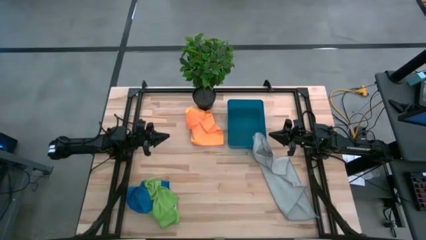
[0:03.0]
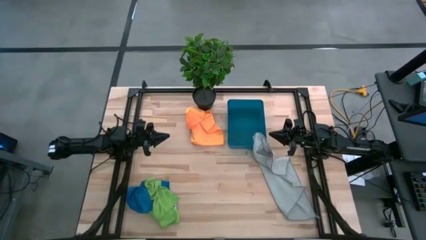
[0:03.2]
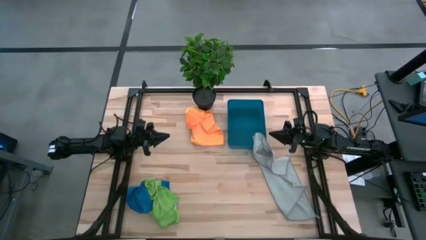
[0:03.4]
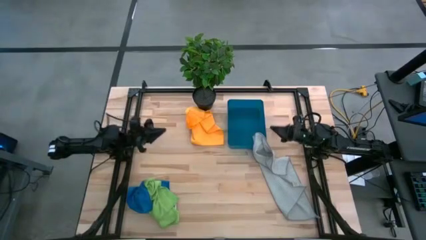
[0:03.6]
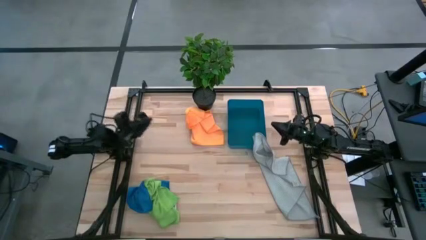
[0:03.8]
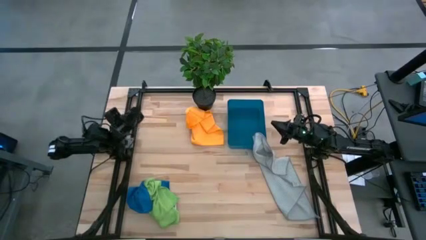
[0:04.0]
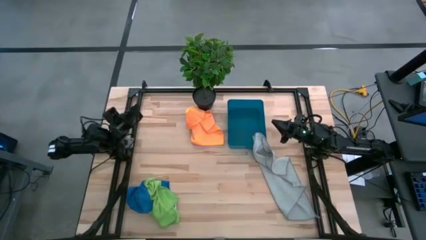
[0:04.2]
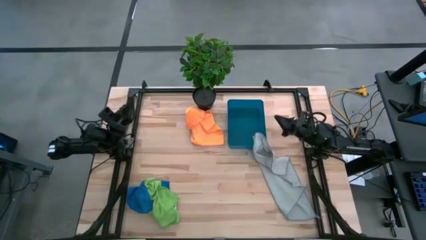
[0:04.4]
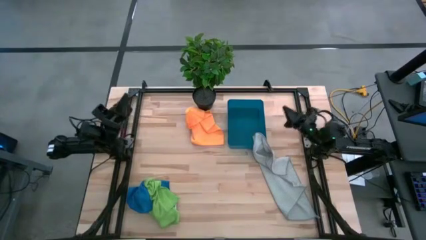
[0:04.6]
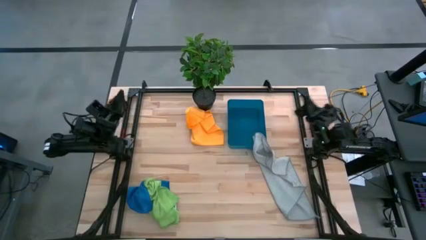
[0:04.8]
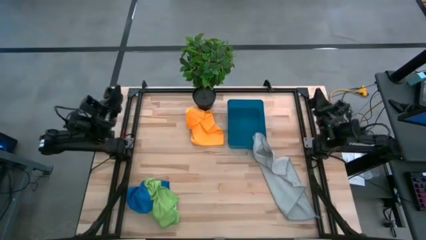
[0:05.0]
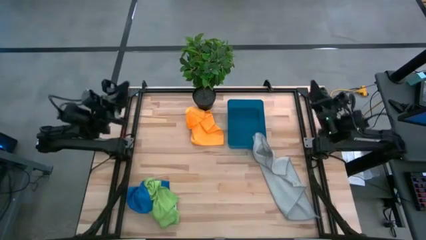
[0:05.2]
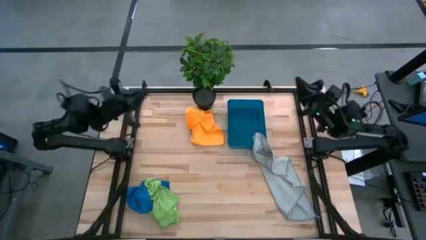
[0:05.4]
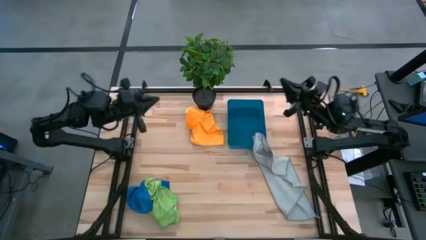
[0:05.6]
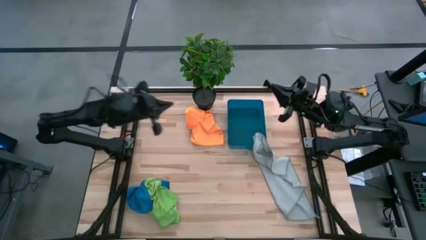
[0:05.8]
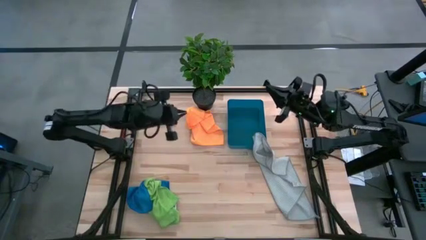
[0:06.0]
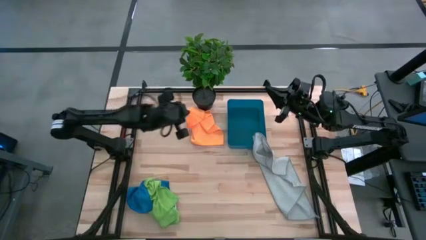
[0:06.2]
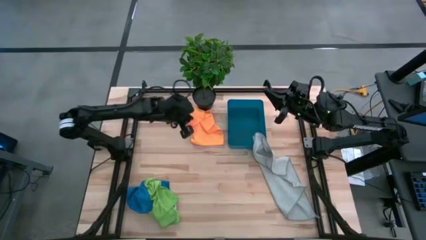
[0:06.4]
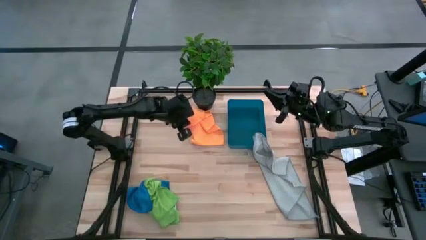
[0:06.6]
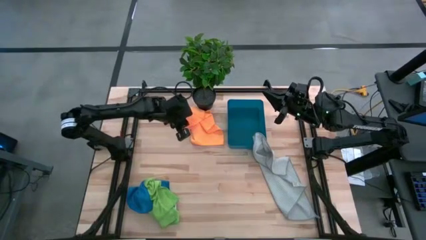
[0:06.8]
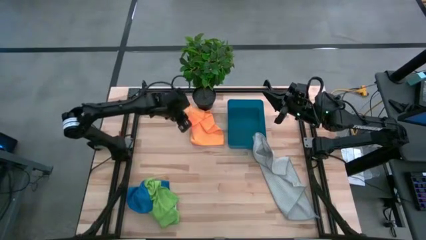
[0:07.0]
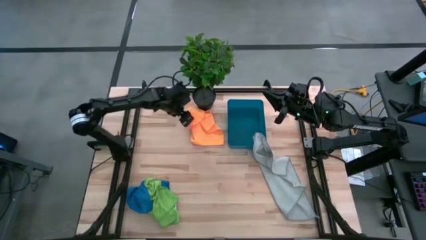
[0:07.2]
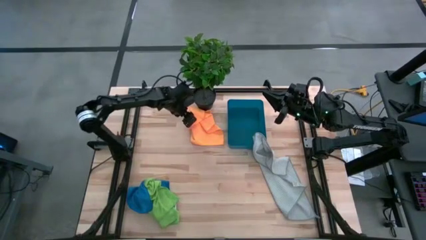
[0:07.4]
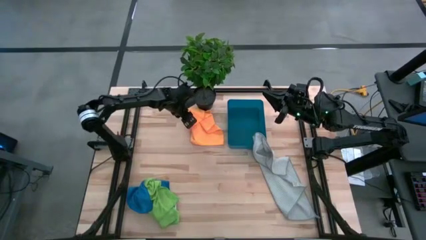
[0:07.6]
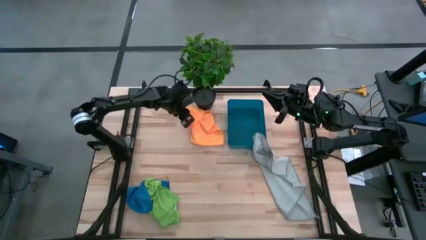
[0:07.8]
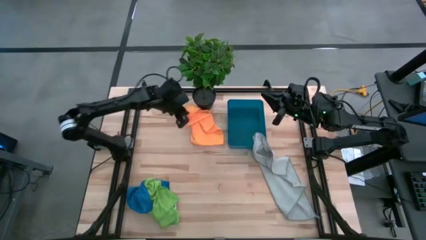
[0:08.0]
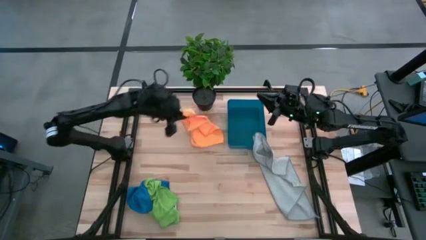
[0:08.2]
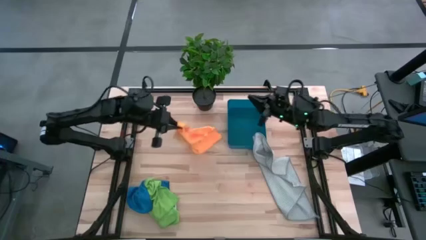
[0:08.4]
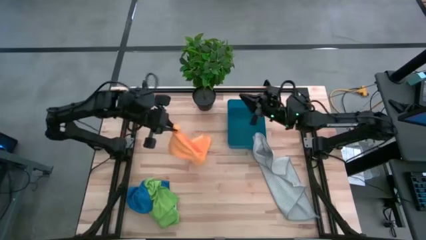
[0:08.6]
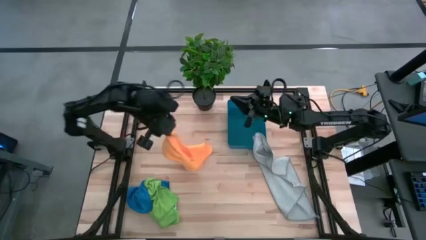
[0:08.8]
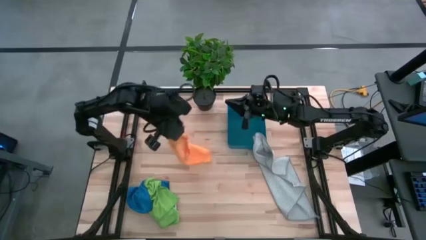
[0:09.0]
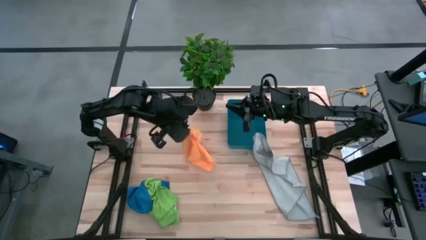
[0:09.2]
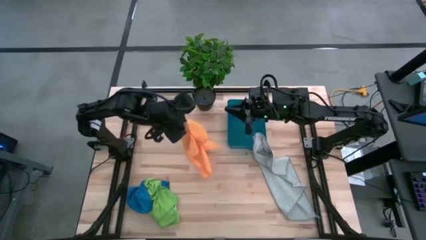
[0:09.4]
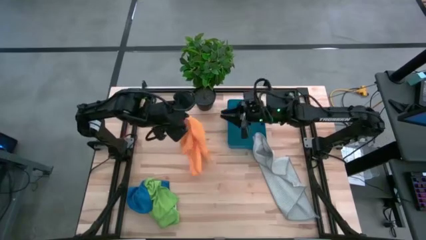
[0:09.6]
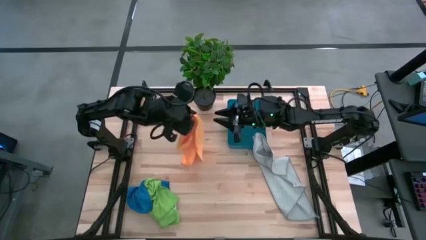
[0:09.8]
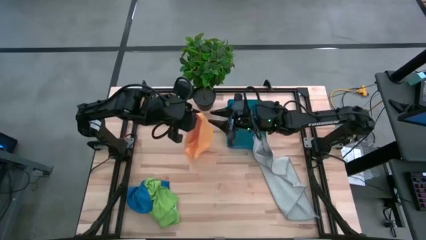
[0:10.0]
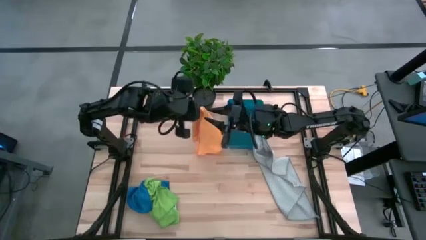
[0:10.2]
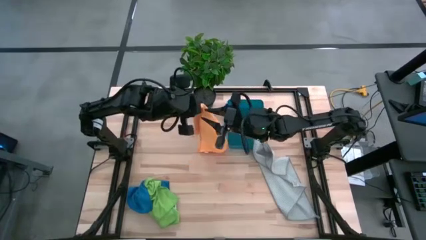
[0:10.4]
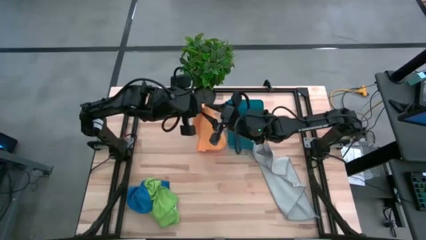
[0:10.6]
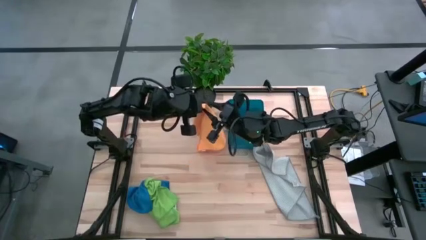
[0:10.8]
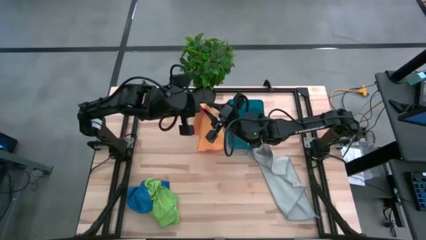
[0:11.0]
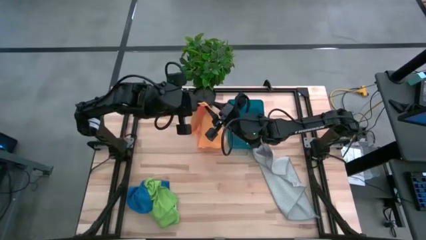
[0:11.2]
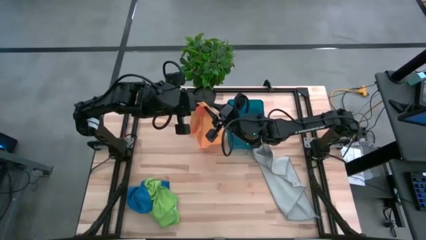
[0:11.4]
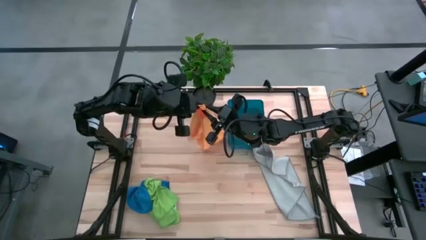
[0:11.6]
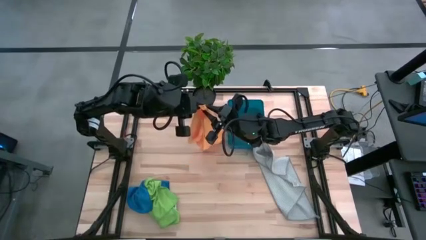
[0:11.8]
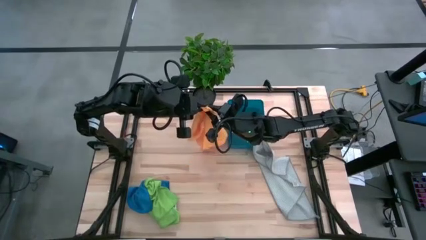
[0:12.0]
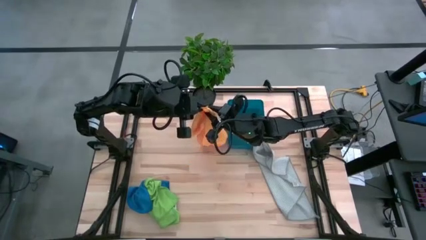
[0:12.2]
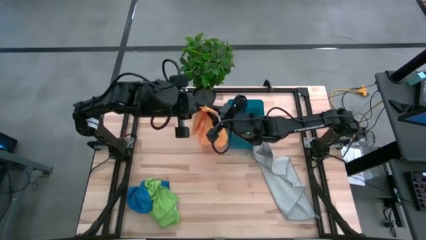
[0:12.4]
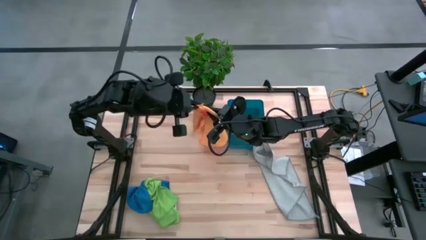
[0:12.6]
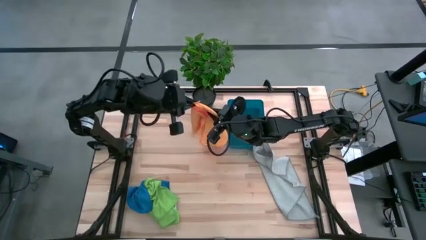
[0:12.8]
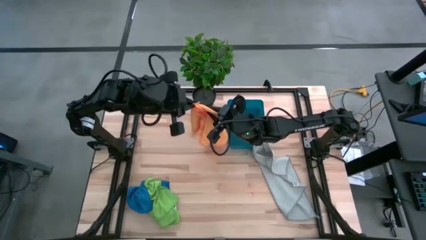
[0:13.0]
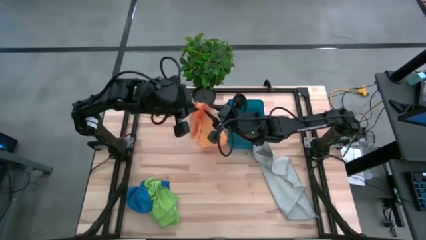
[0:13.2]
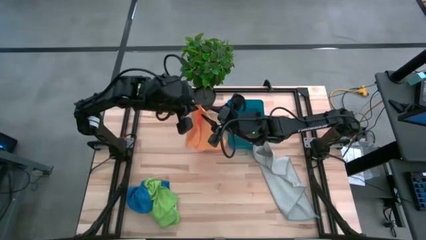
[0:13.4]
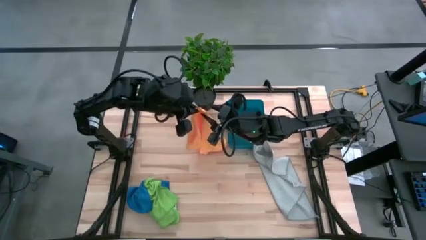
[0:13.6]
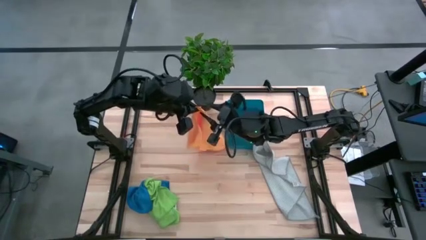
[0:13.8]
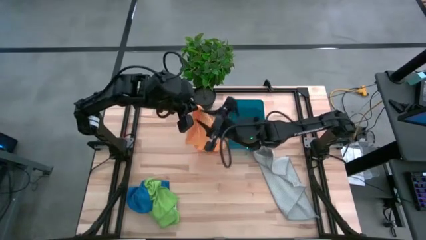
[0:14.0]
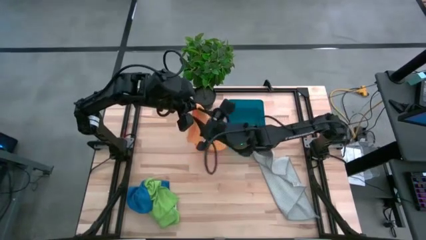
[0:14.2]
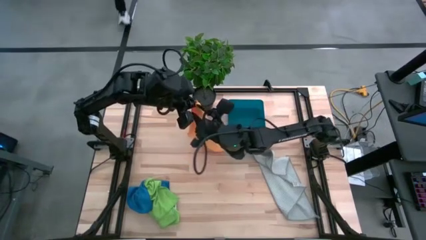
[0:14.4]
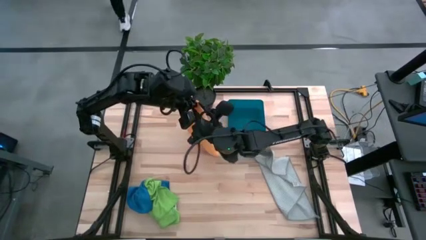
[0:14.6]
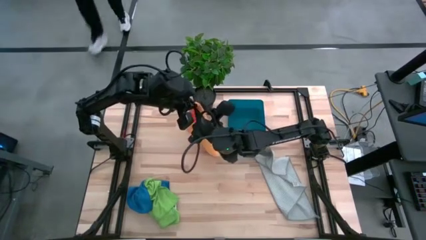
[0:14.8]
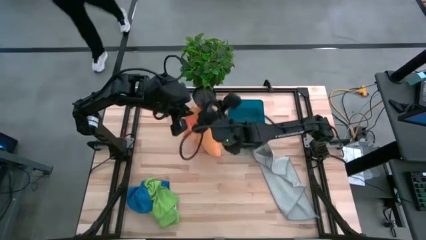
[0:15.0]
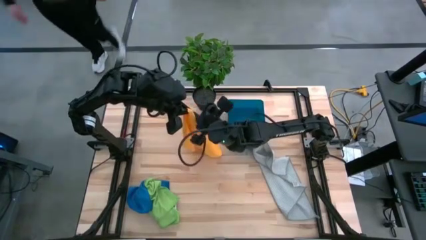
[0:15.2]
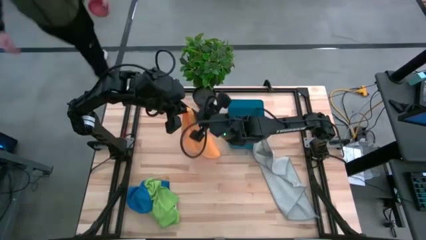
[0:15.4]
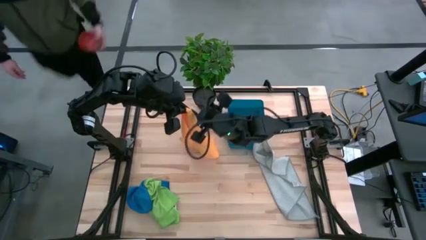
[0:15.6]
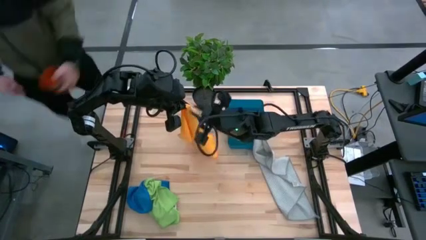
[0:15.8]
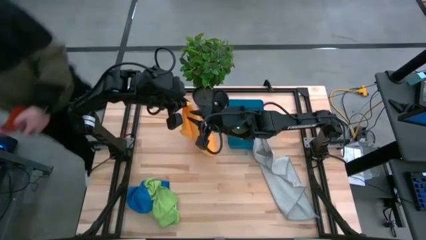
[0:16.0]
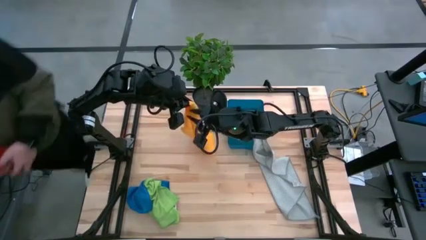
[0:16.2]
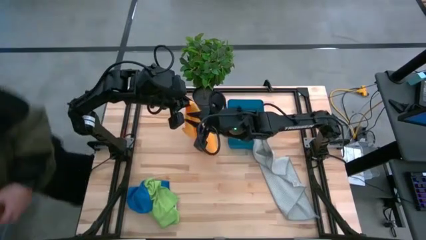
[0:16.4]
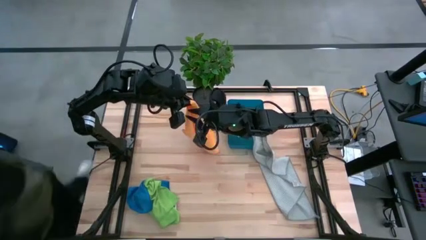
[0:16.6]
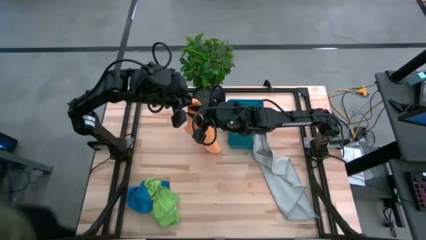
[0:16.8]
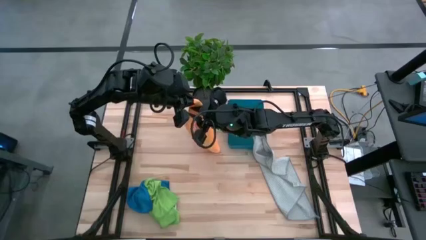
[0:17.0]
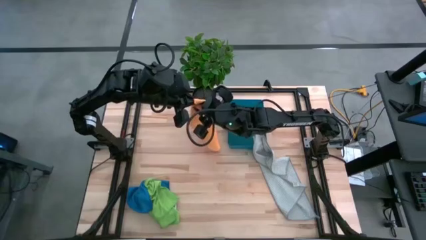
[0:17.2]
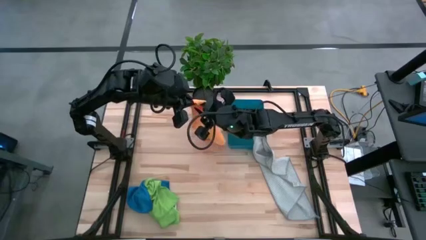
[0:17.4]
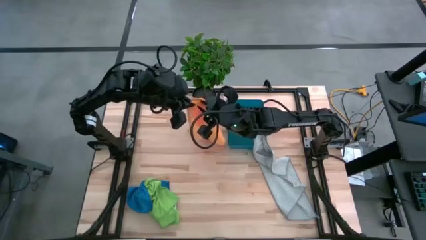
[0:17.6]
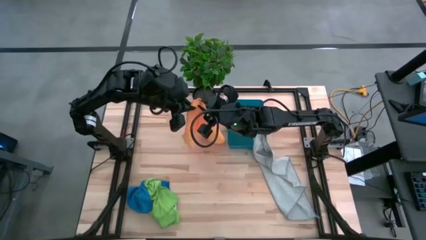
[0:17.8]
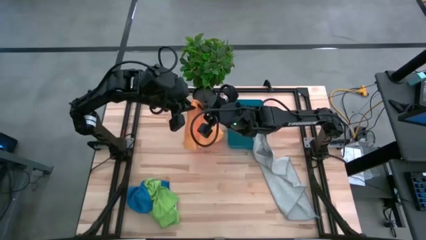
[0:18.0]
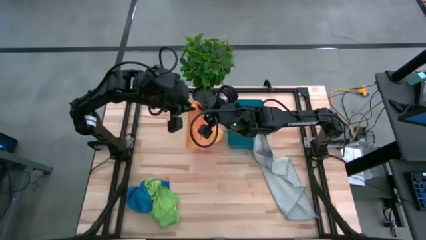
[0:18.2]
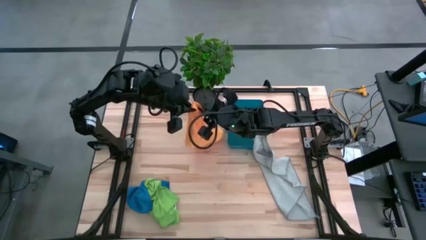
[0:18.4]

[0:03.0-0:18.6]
Task: Fold microfiber towels
Fold the orange microfiber towel
